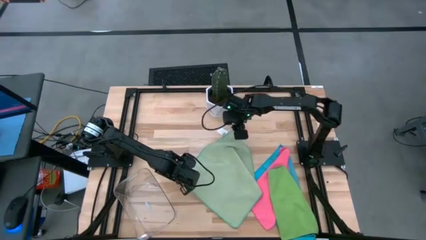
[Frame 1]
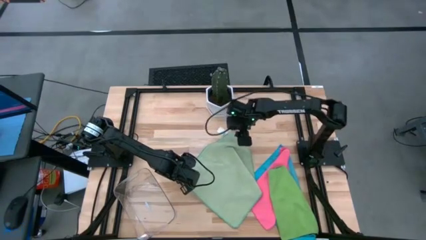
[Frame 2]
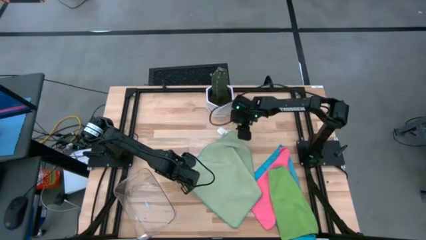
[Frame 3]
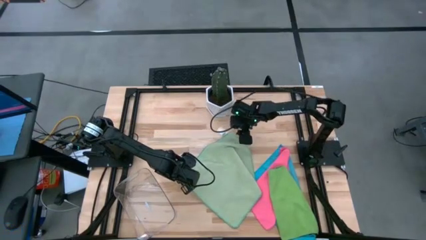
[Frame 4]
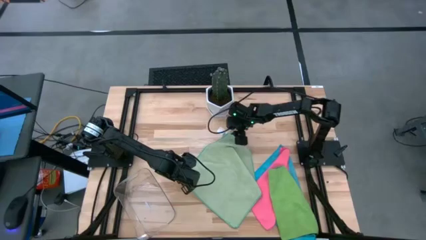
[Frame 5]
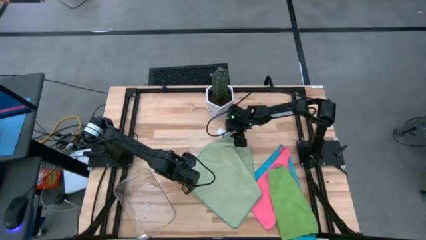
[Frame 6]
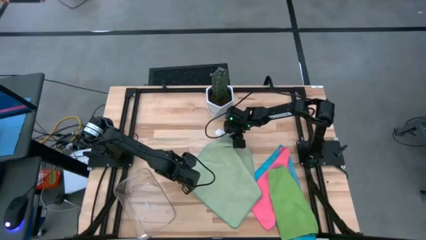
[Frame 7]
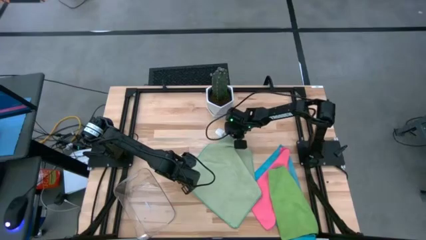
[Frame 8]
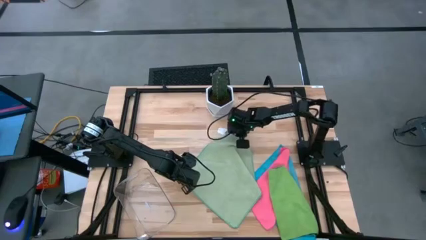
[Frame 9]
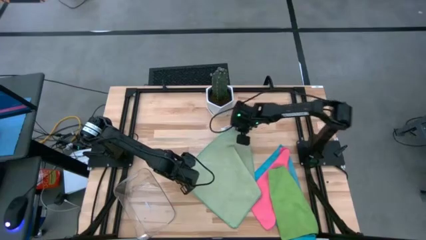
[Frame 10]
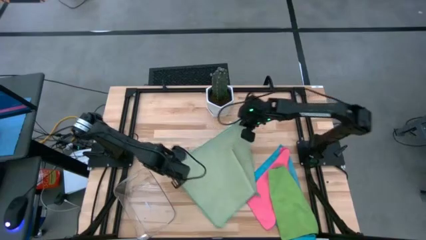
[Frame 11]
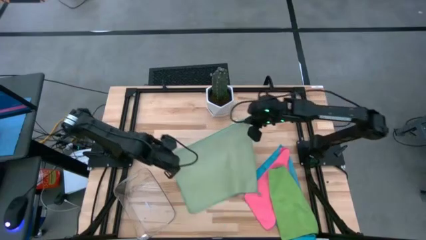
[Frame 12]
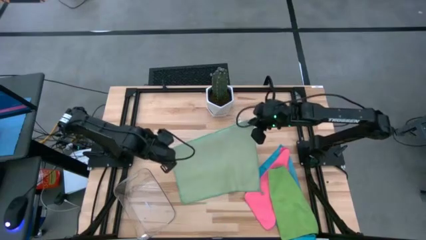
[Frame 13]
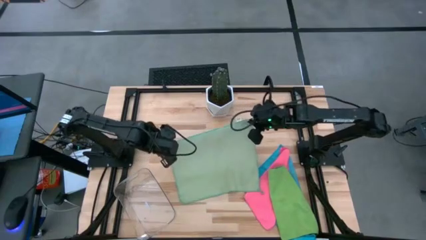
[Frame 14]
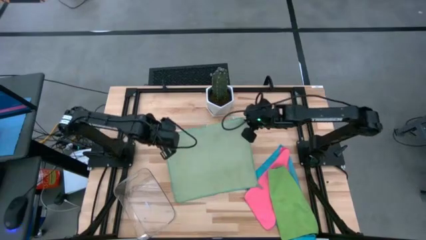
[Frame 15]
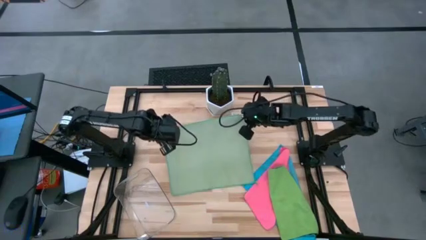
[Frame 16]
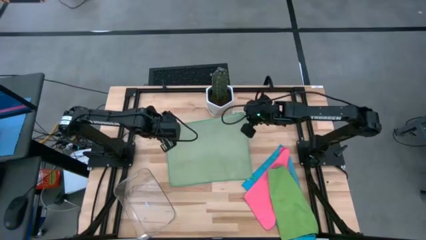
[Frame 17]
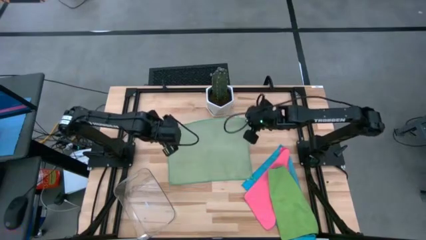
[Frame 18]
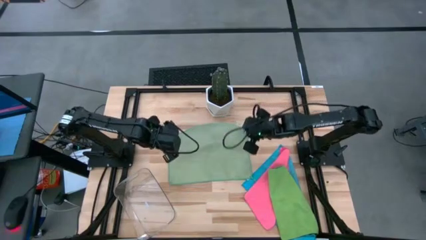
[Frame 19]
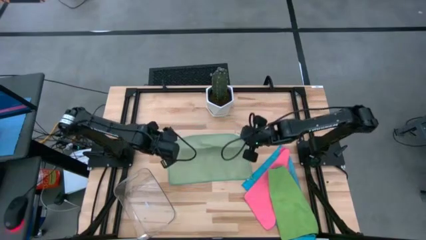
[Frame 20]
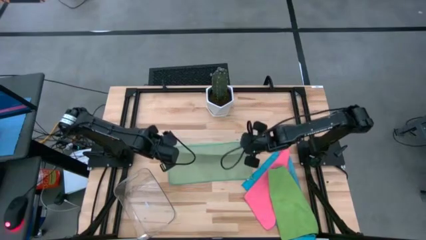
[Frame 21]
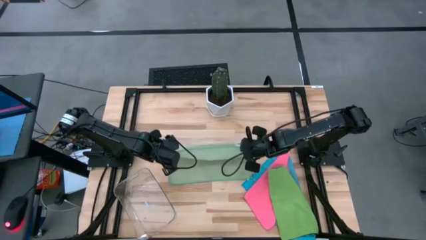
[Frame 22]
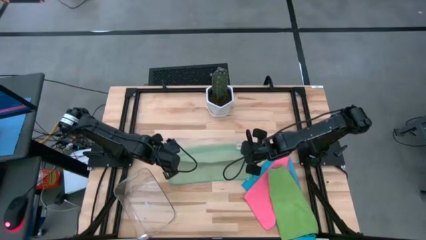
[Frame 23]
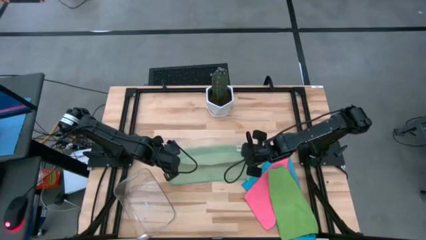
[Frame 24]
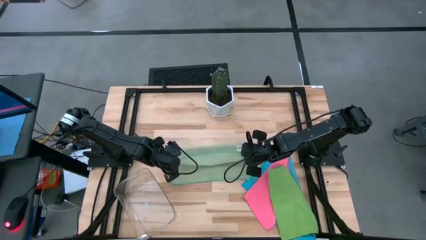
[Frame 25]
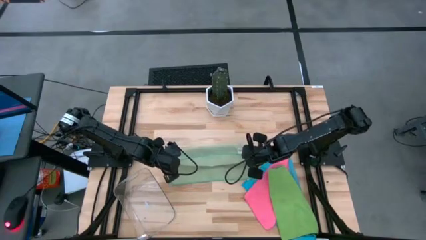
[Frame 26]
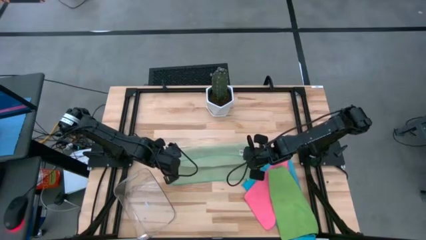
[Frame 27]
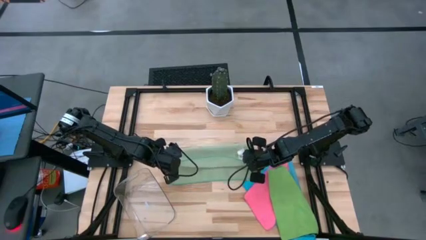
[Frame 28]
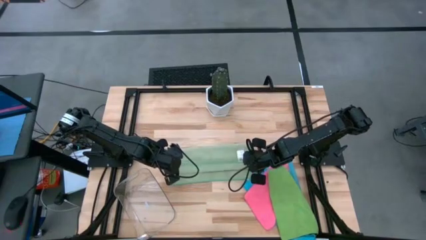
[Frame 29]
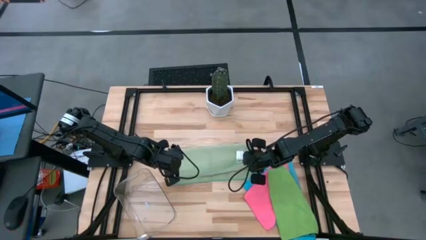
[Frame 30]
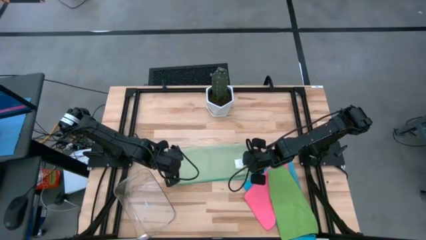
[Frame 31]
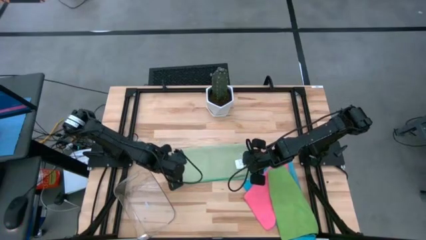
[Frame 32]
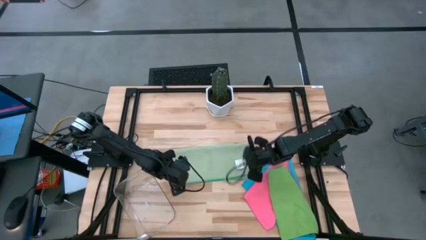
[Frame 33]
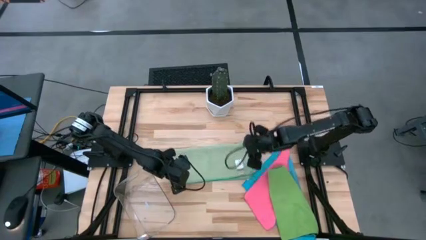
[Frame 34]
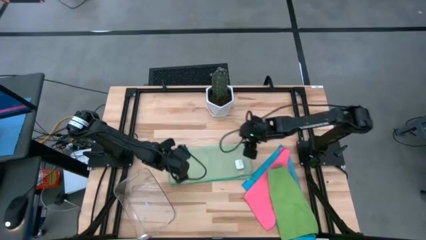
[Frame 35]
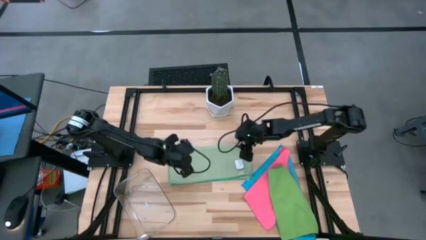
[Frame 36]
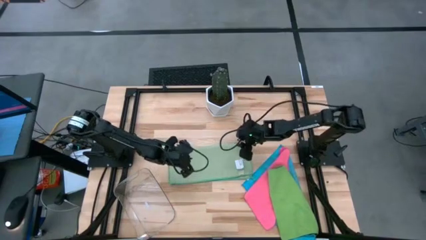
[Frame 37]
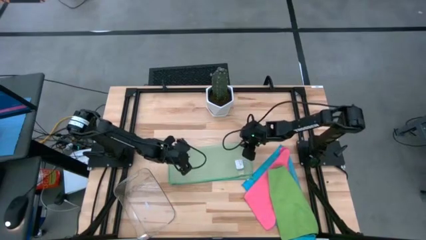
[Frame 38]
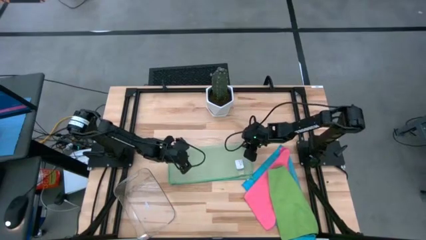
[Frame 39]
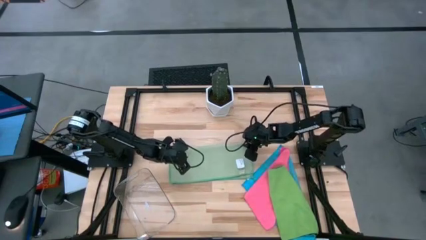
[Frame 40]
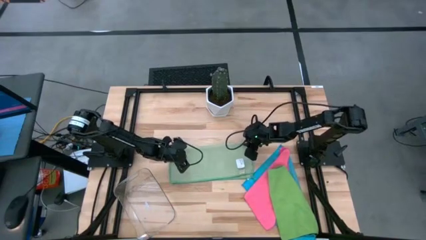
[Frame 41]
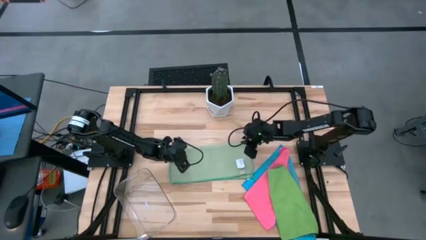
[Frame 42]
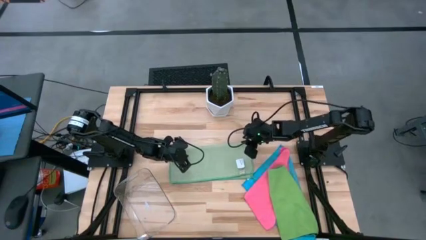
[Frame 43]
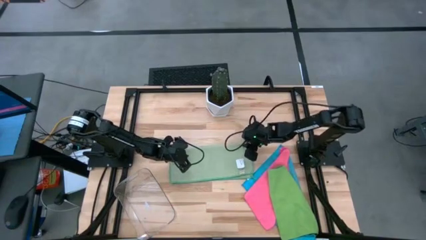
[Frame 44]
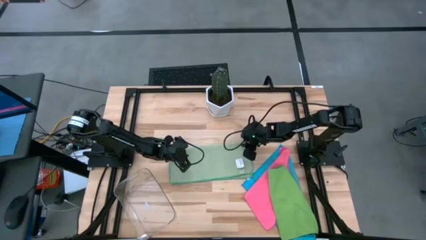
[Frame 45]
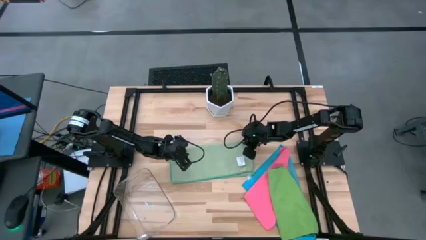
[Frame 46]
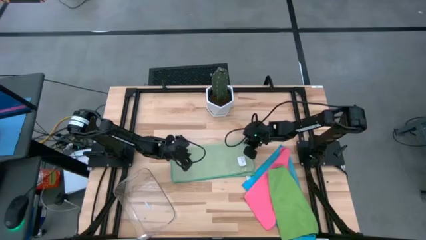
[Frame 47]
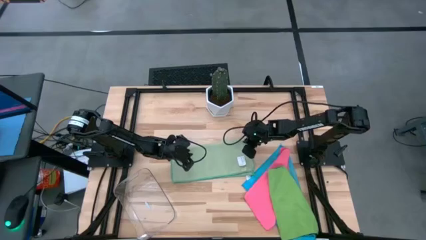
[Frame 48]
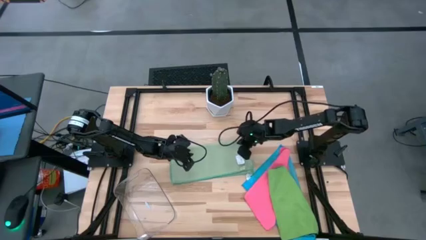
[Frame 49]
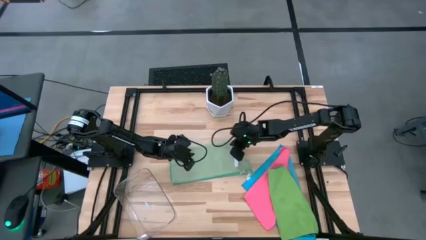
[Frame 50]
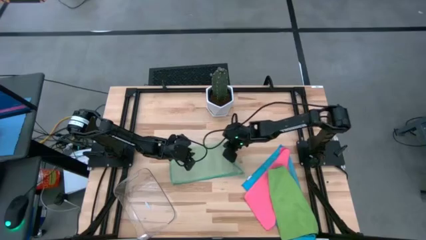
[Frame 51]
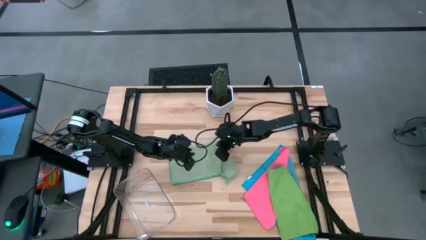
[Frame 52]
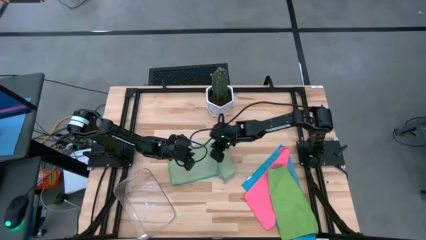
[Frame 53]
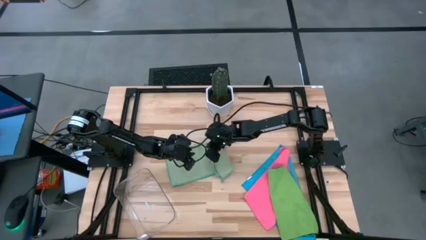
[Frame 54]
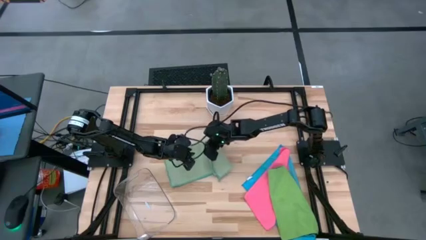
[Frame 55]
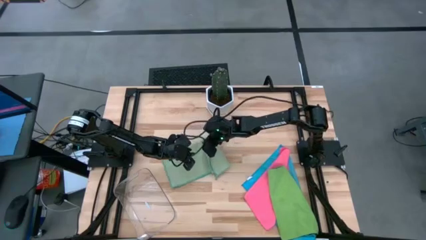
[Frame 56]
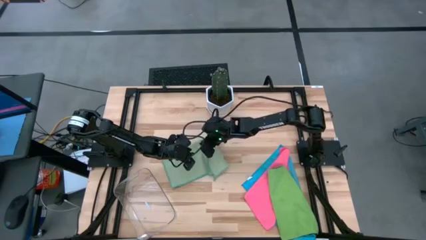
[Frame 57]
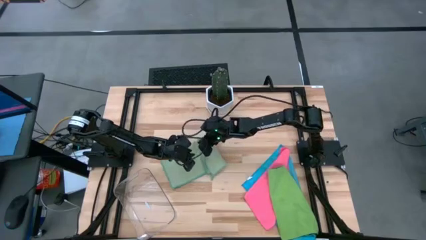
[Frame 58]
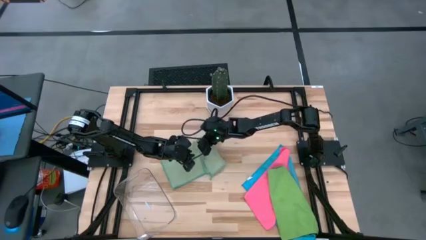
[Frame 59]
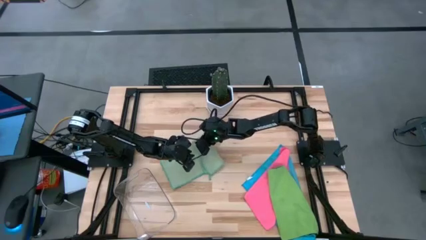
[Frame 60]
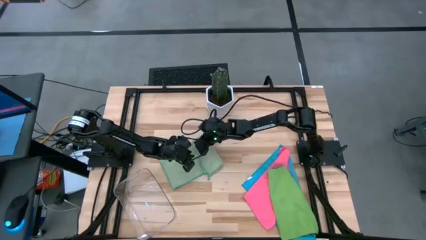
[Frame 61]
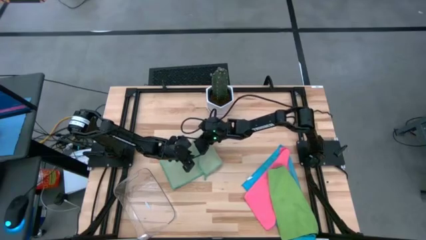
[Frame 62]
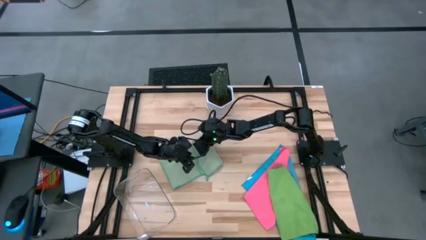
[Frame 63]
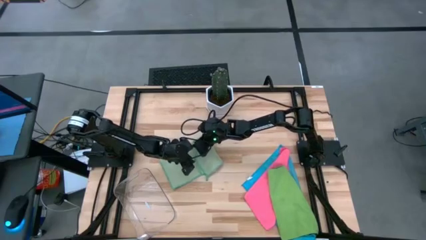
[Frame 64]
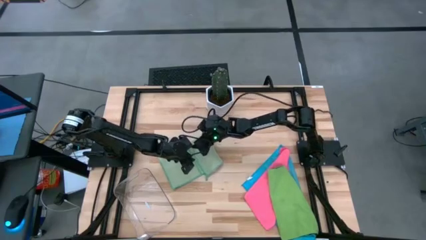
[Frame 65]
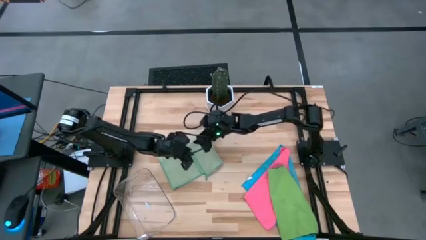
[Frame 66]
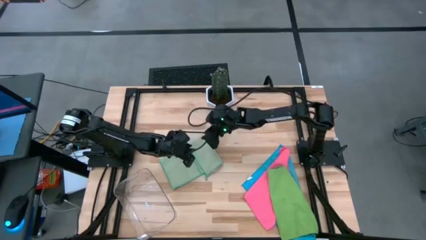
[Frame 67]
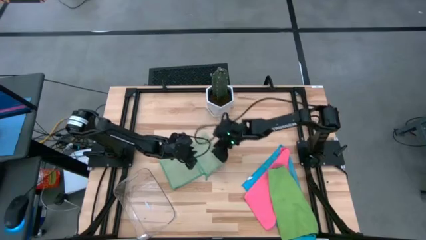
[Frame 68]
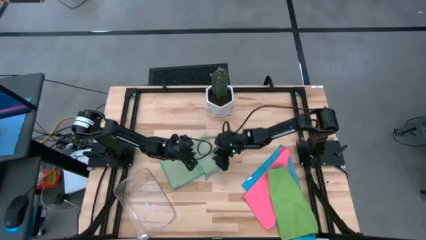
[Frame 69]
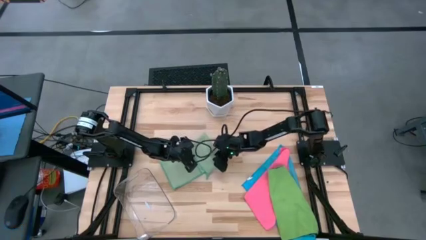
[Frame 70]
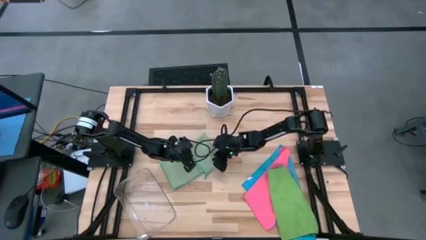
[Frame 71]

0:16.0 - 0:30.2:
Task: Fold microfiber towels
Fold the light green microfiber cloth
